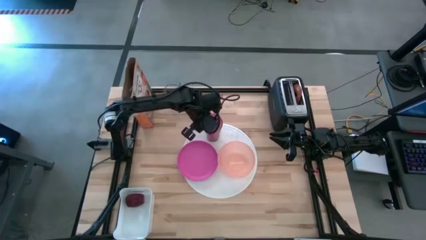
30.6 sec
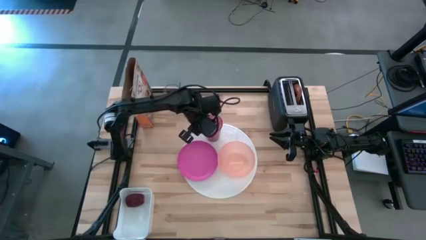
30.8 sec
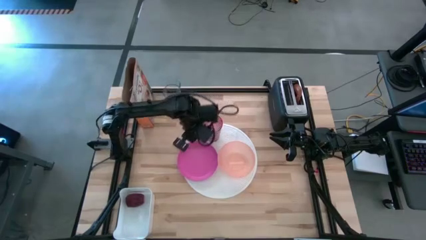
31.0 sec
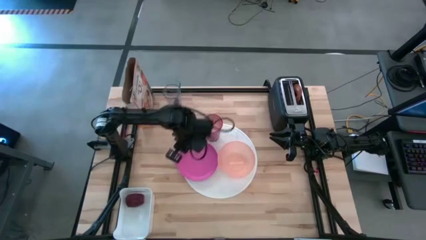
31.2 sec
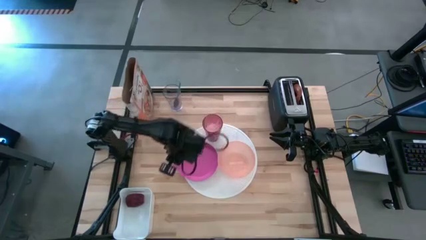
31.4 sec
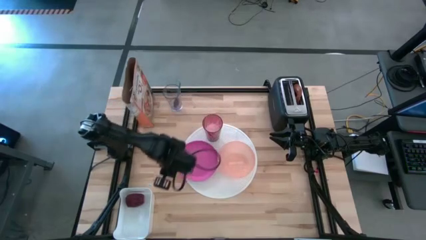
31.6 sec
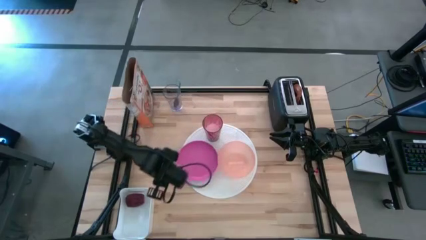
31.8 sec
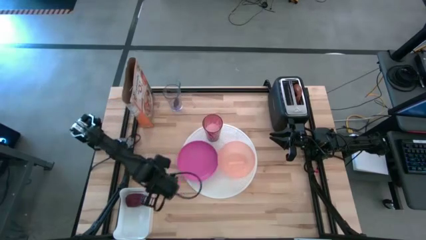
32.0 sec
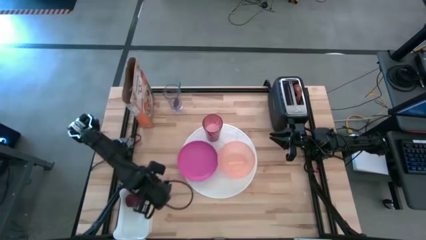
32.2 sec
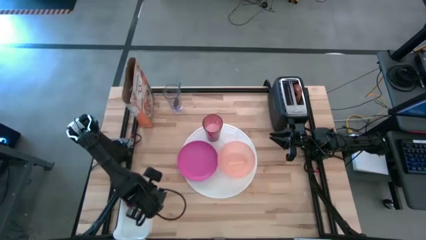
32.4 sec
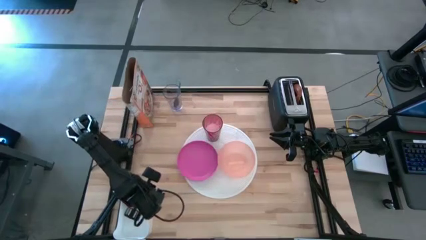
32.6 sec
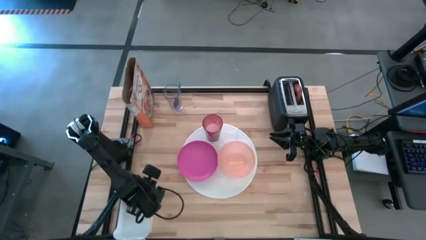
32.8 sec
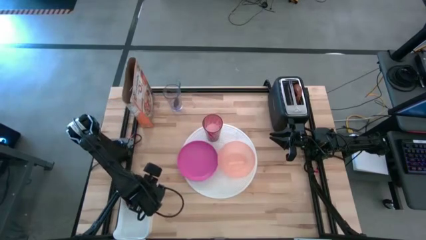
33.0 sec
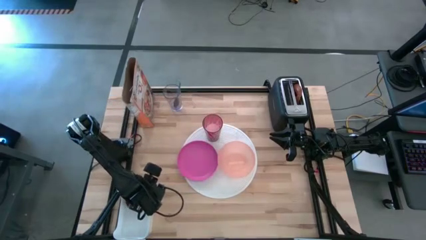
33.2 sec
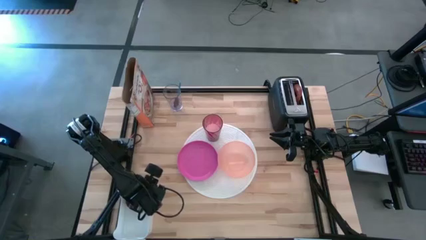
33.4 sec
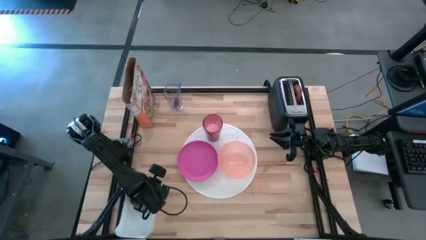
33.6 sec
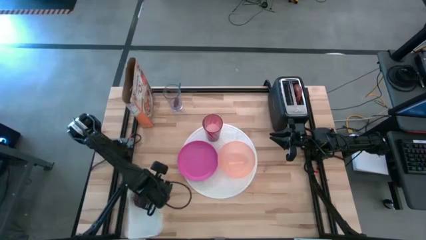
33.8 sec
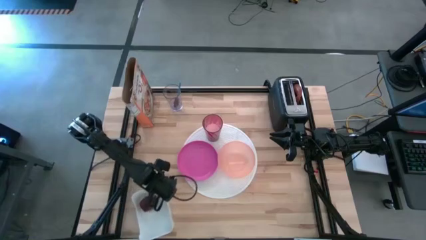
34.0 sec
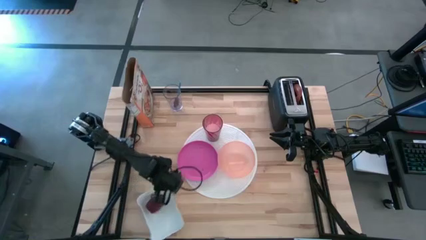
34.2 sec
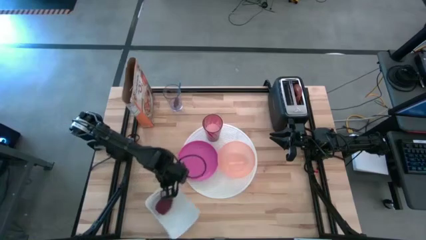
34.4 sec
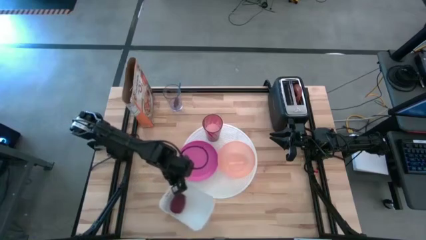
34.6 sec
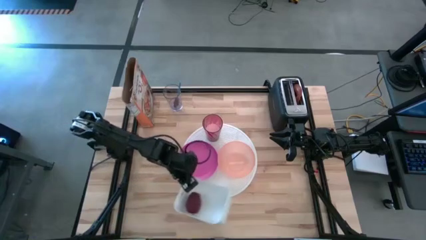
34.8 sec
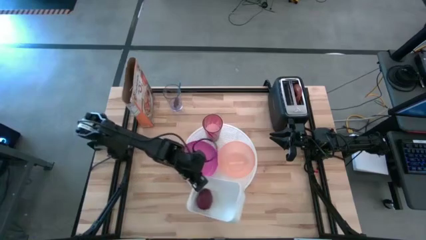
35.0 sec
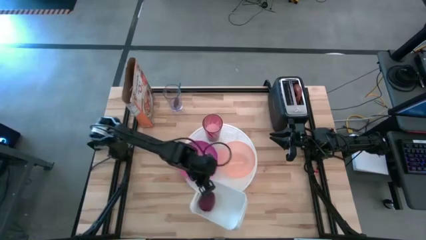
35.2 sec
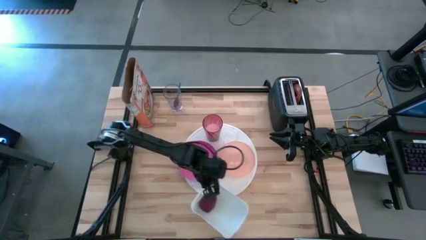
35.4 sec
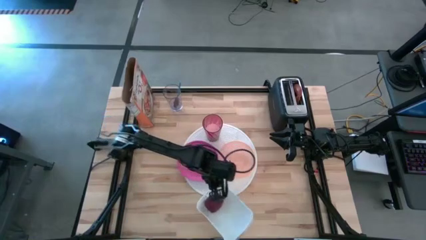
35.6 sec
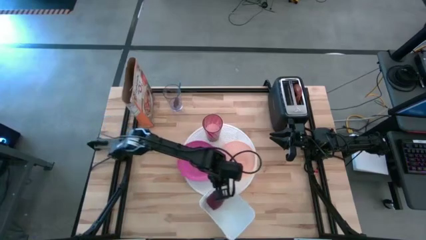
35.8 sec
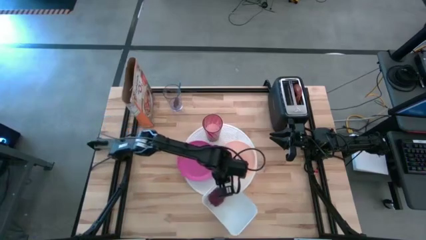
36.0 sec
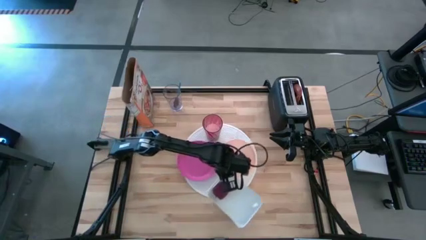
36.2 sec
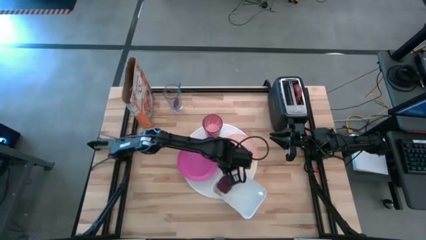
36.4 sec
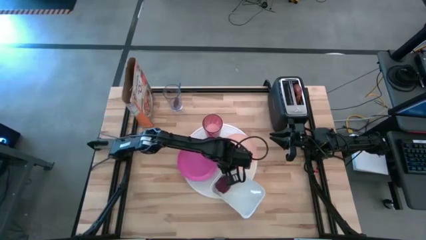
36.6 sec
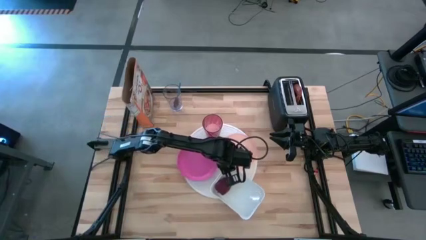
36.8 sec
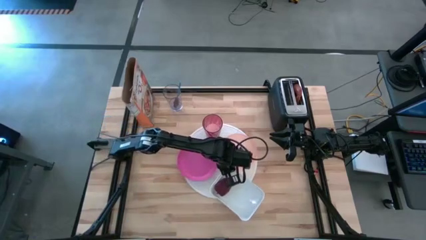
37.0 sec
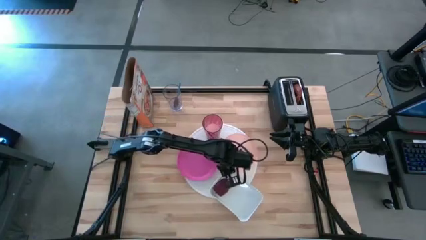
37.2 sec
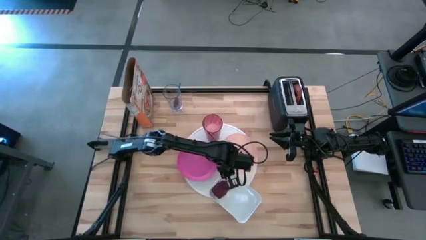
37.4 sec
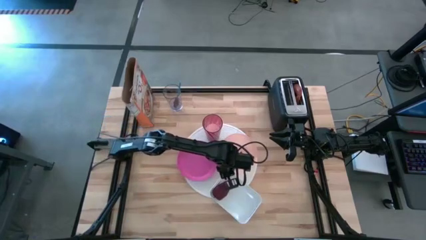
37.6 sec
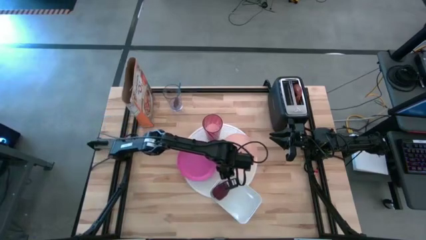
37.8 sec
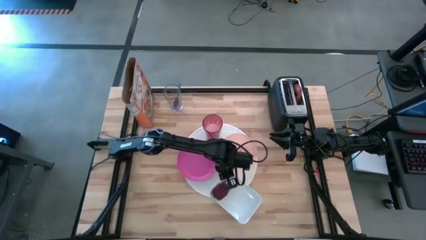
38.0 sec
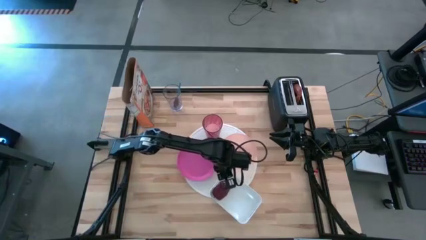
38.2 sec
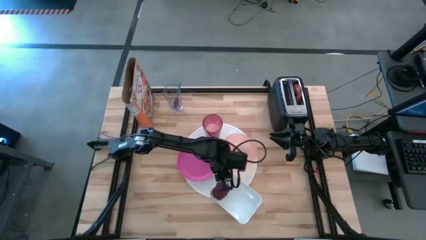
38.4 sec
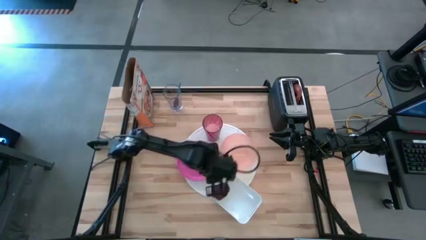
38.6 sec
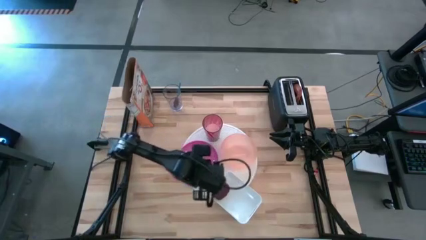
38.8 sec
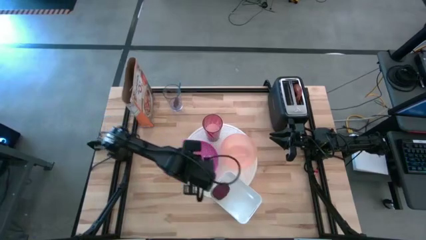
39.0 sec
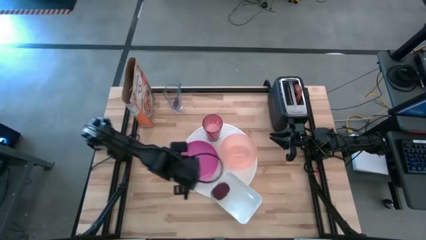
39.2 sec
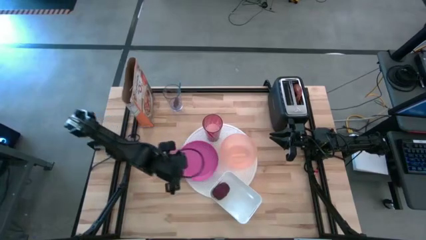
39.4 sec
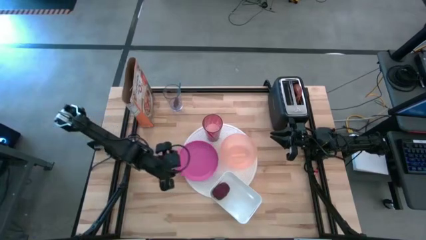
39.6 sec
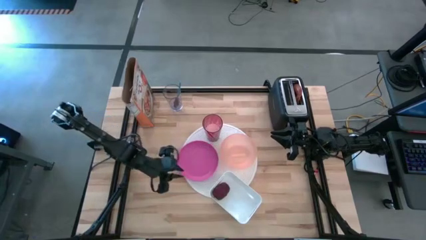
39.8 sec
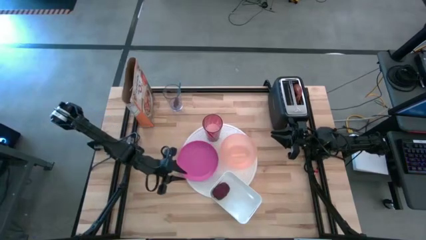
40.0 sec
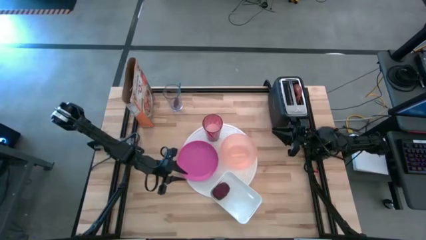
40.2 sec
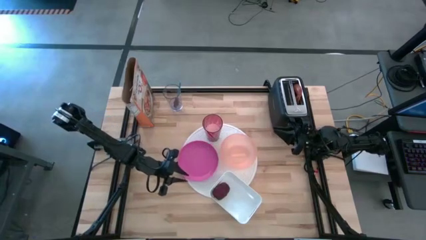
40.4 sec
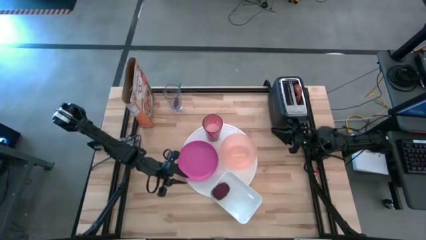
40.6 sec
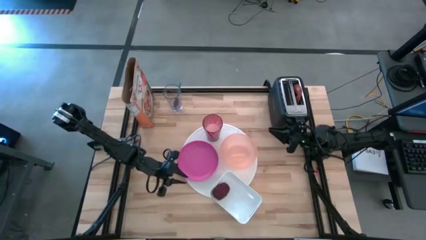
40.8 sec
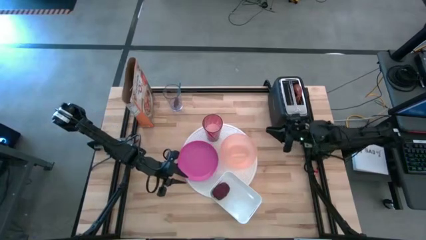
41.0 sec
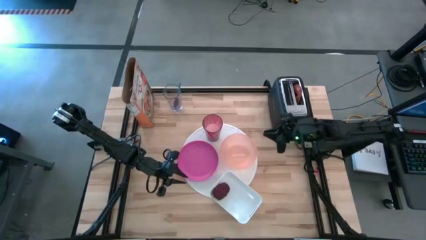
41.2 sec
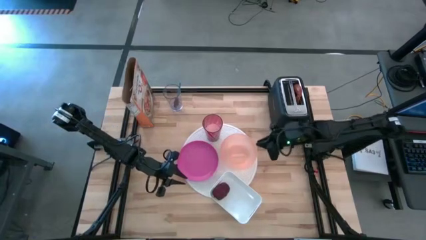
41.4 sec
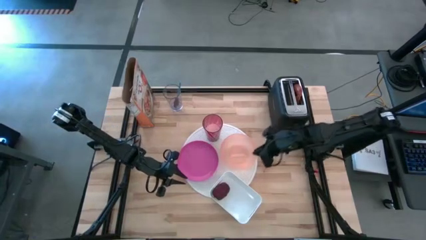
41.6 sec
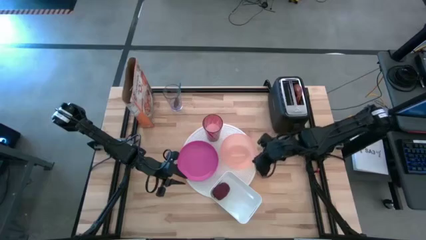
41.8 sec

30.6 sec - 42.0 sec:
Task: Arrange a breakfast setting
Move the white bin to the bottom right of the table
